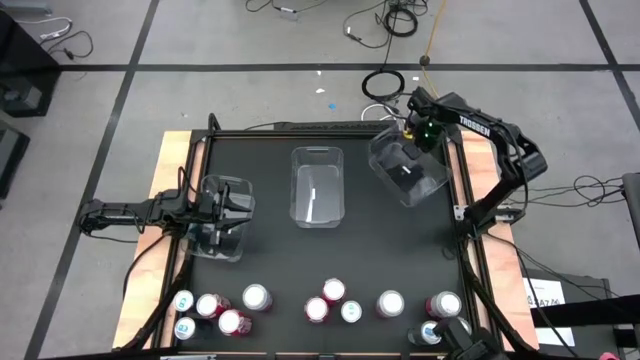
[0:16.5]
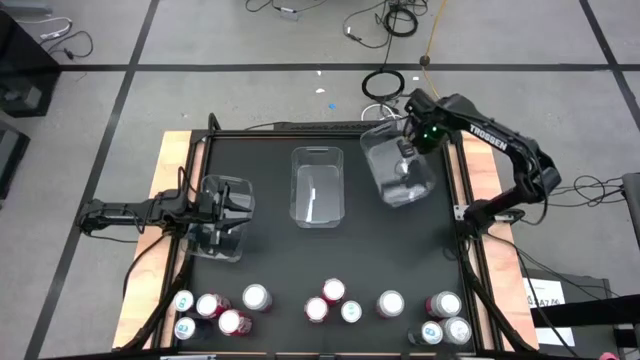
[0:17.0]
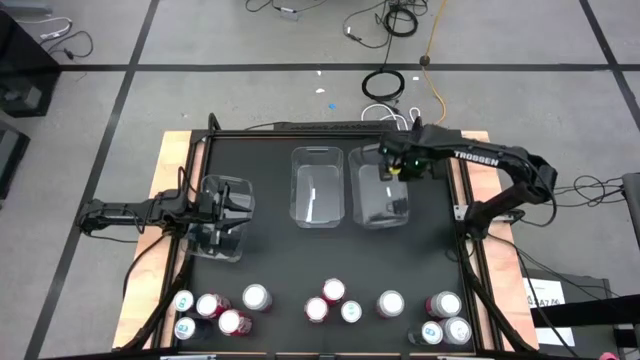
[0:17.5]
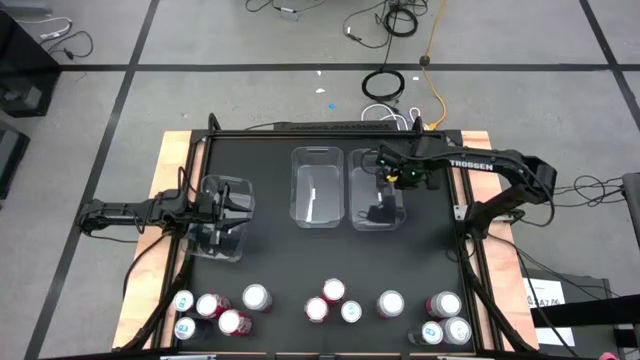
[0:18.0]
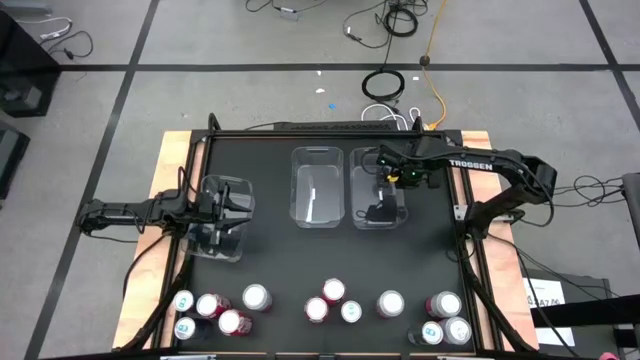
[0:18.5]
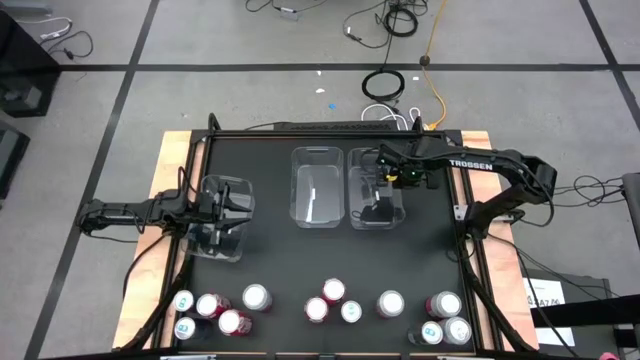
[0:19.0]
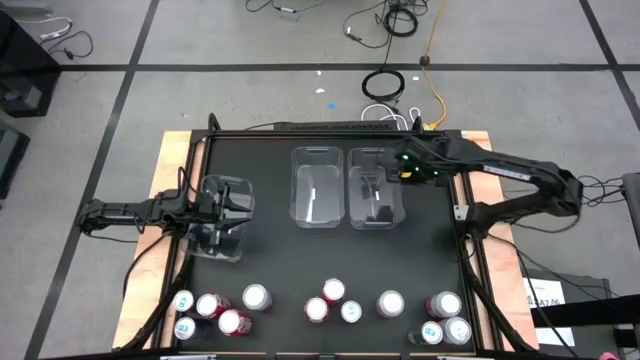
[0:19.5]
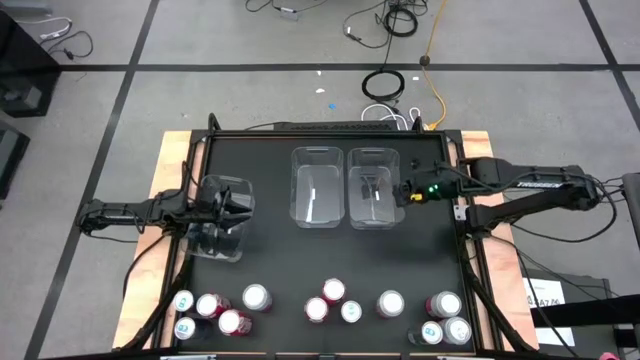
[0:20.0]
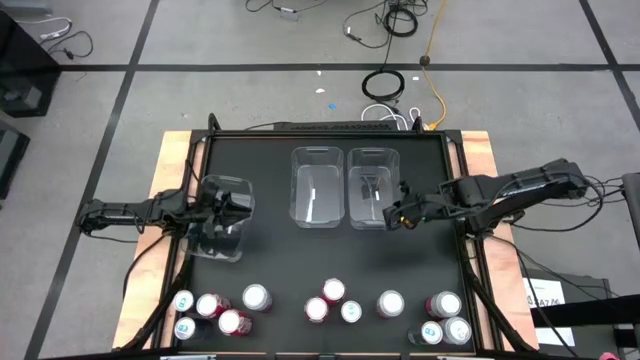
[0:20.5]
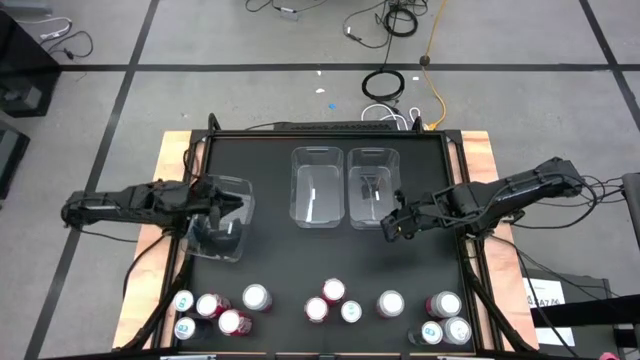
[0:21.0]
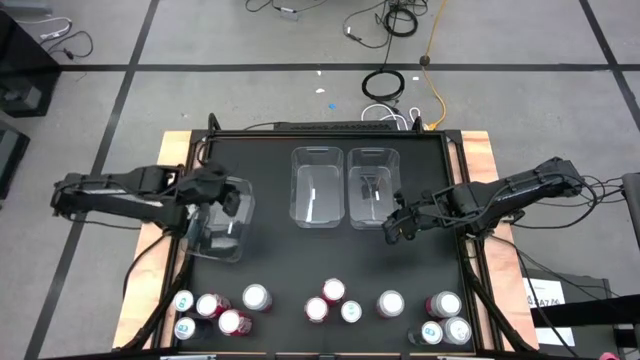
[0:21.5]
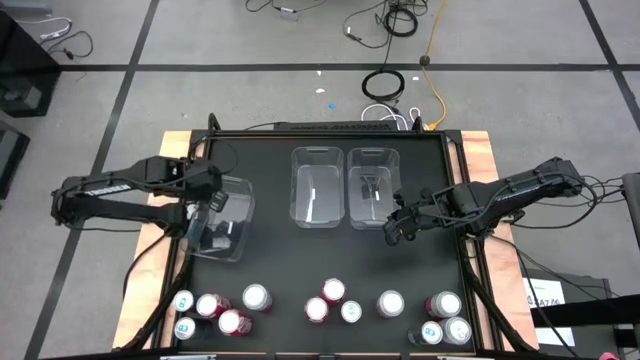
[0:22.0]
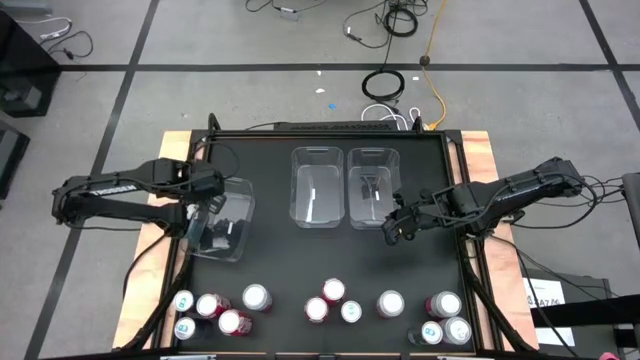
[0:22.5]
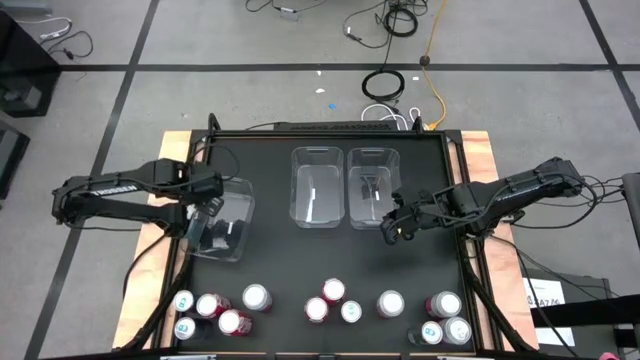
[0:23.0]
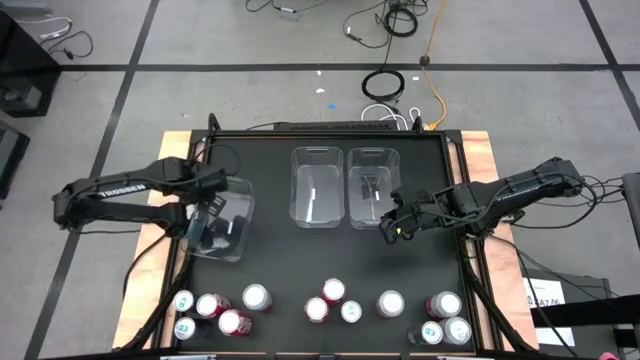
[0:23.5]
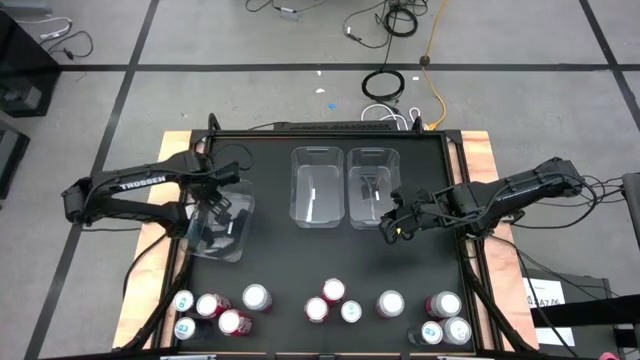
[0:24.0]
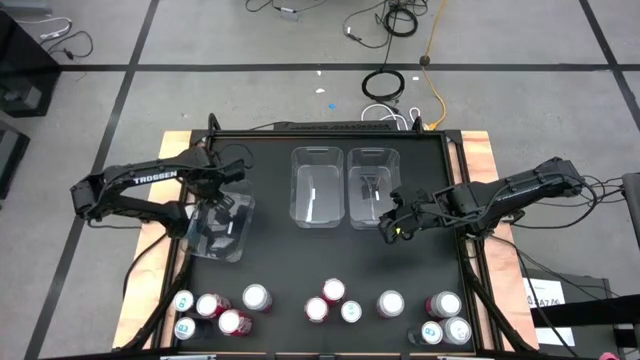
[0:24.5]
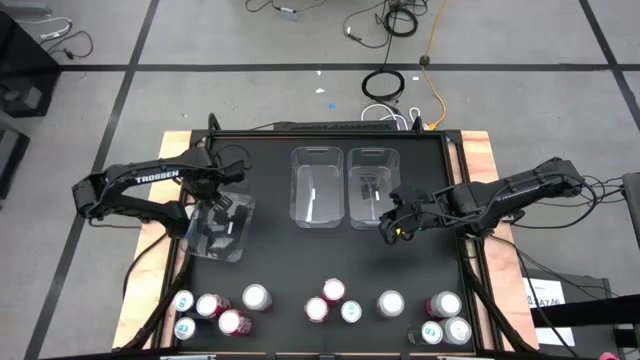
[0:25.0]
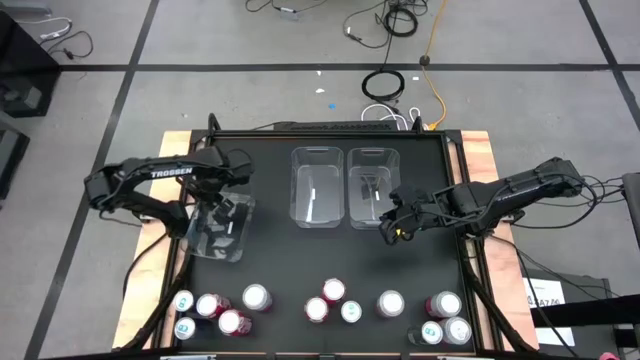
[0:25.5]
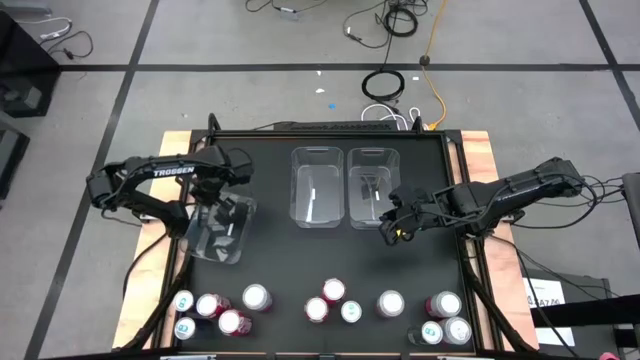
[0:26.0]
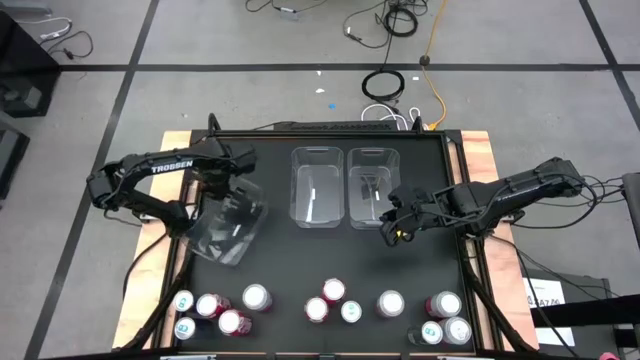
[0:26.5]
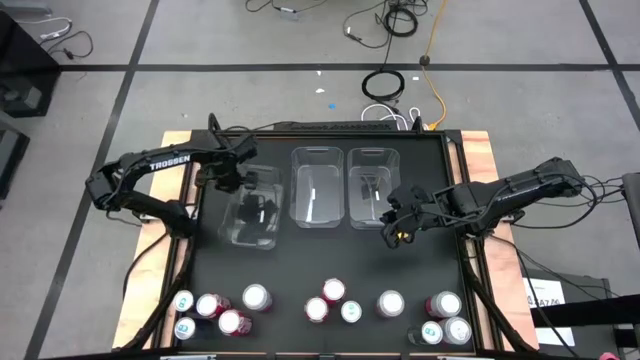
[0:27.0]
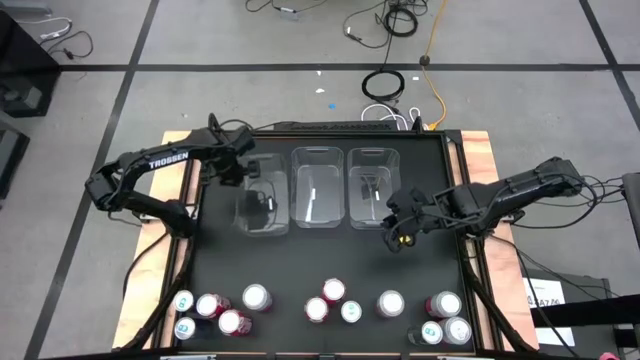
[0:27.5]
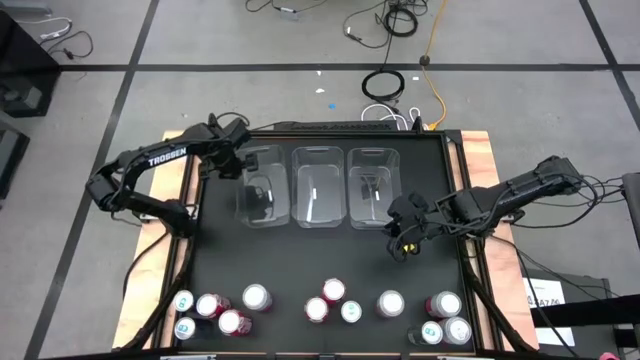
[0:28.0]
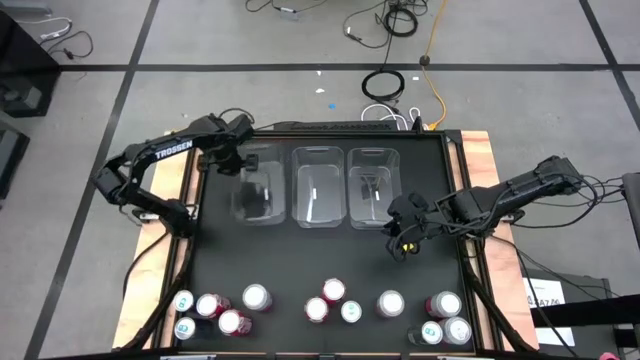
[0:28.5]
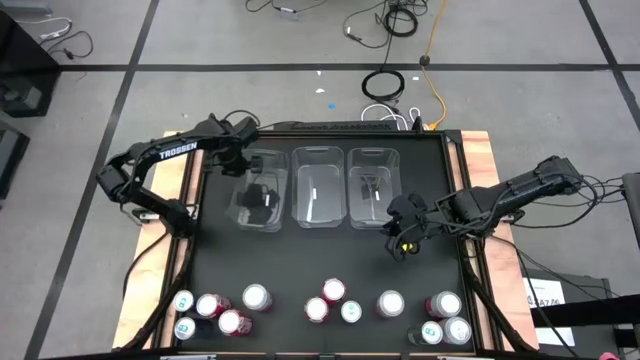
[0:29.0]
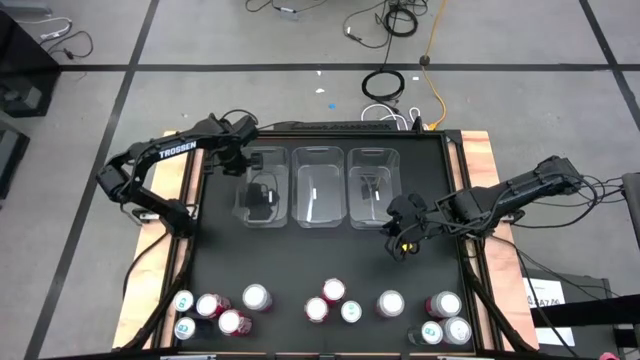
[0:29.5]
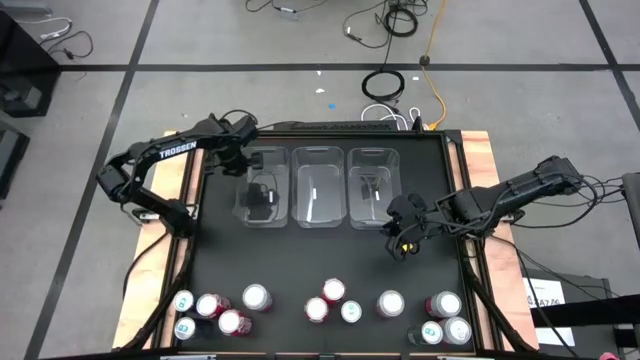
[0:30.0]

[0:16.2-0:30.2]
Task: Sort soda cans
Move the transparent bins to the top of the table
